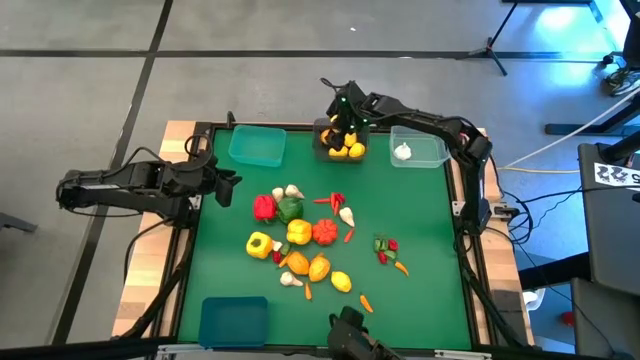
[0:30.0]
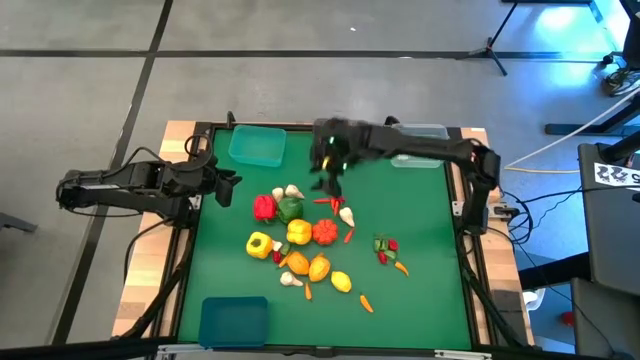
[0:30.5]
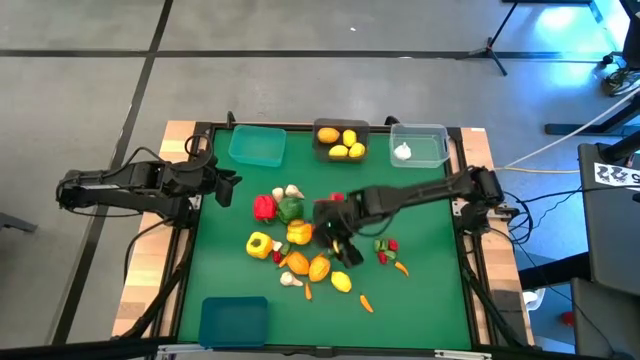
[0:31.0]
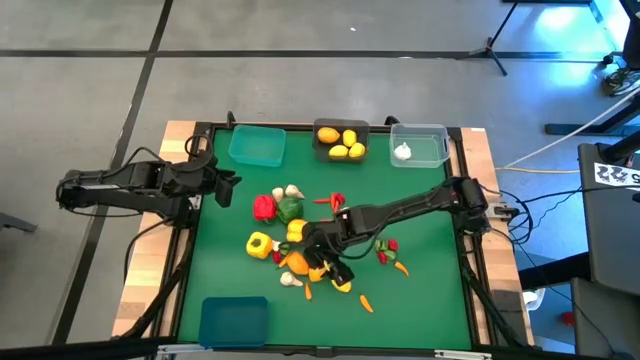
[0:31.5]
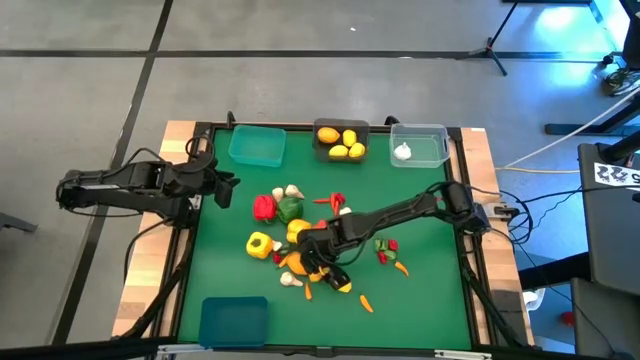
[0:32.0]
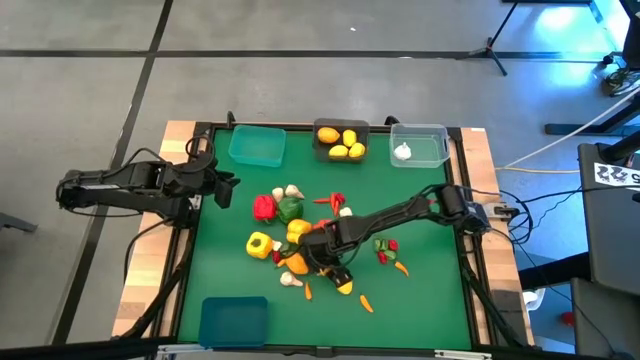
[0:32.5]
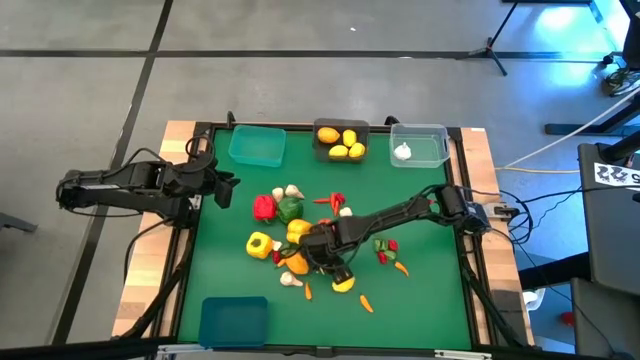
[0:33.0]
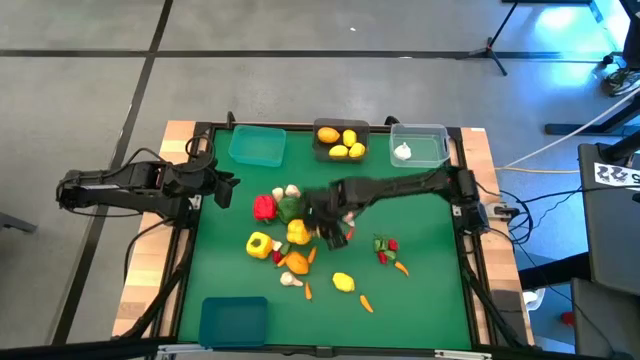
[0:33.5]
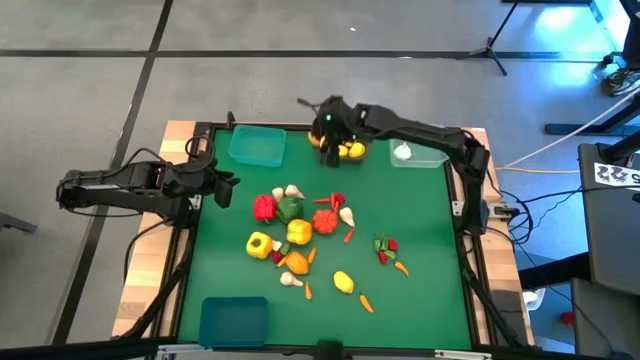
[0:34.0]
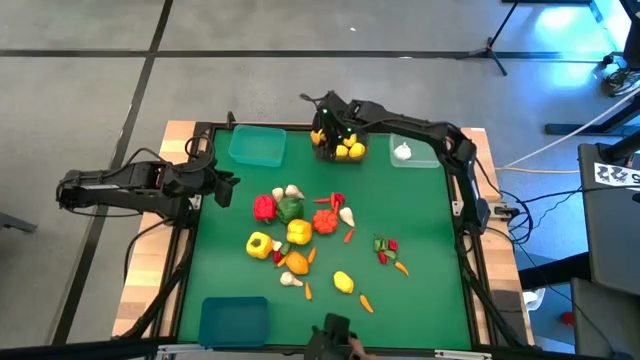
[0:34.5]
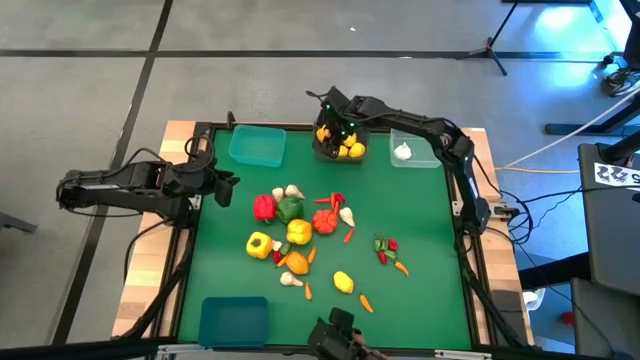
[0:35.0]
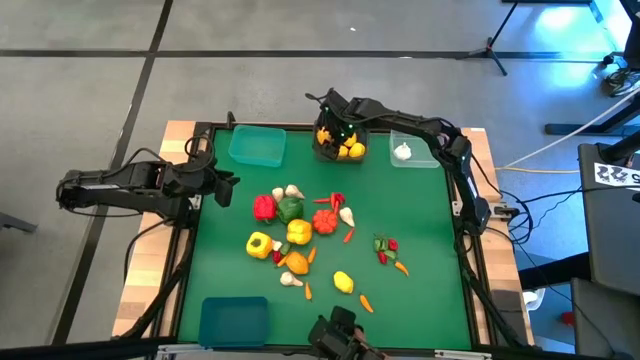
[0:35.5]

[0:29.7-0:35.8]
Task: Sort produce into baskets
Put the yellow lemon into the black bin

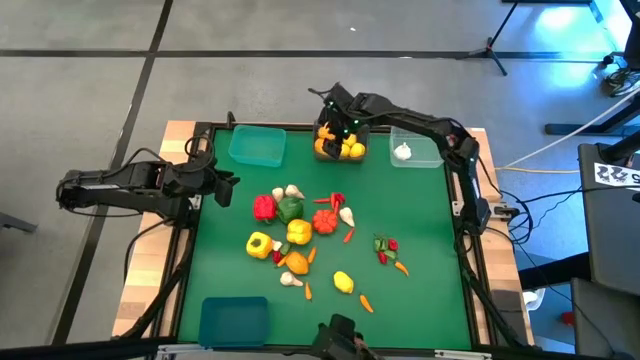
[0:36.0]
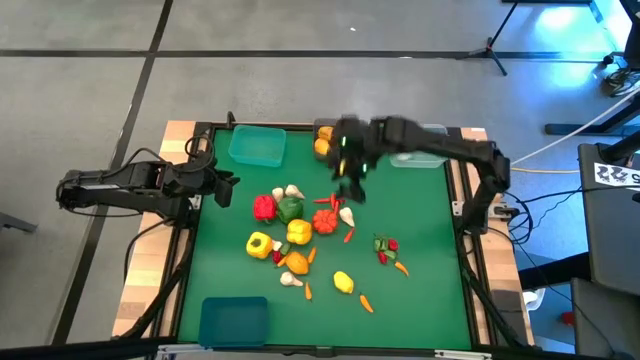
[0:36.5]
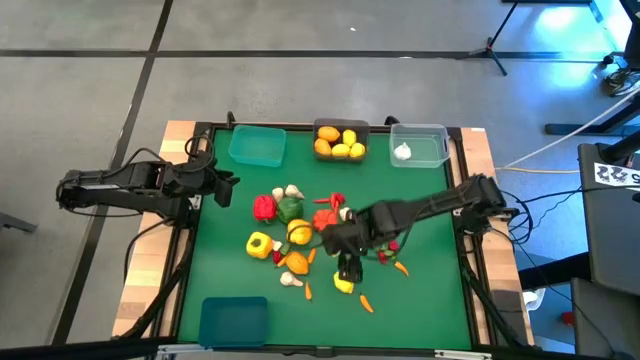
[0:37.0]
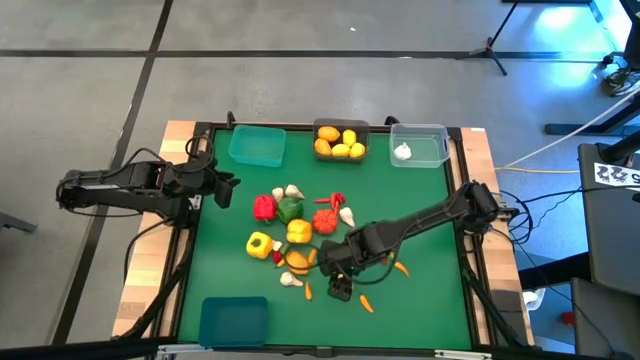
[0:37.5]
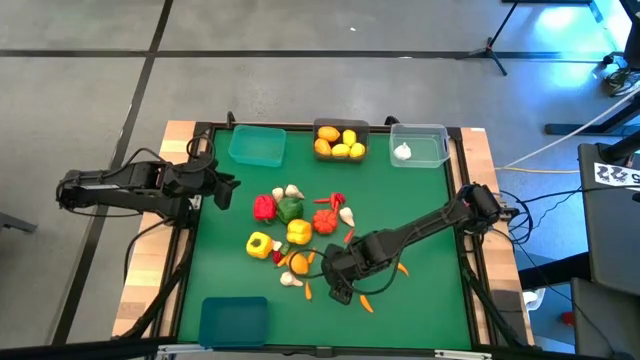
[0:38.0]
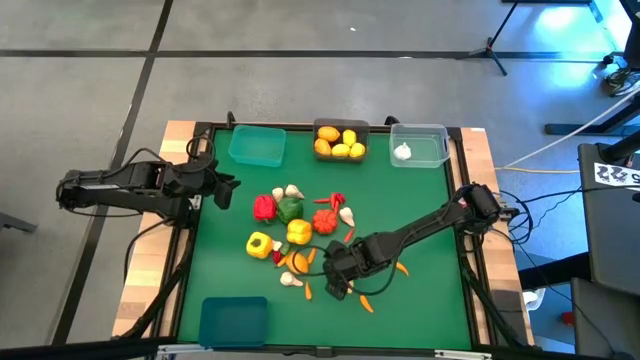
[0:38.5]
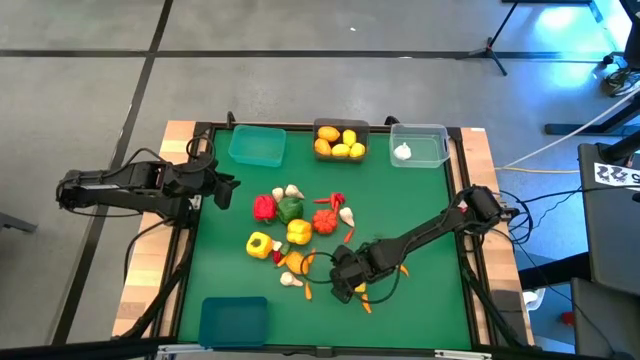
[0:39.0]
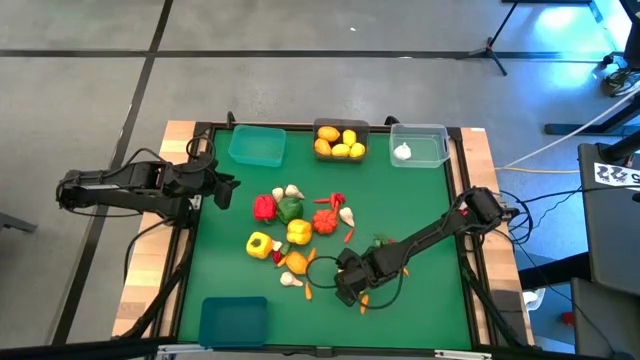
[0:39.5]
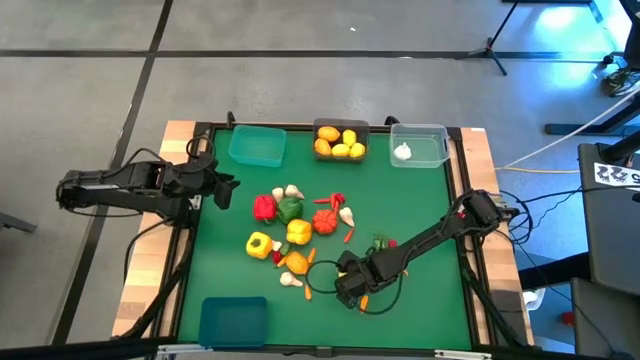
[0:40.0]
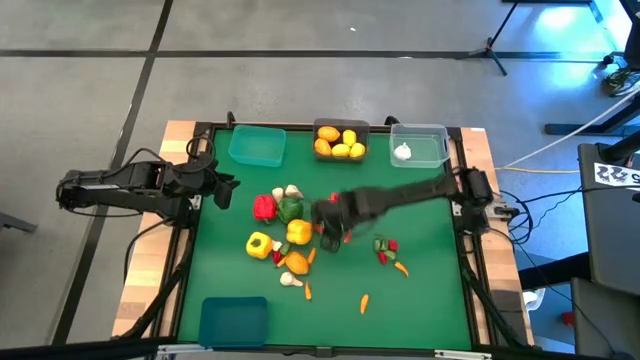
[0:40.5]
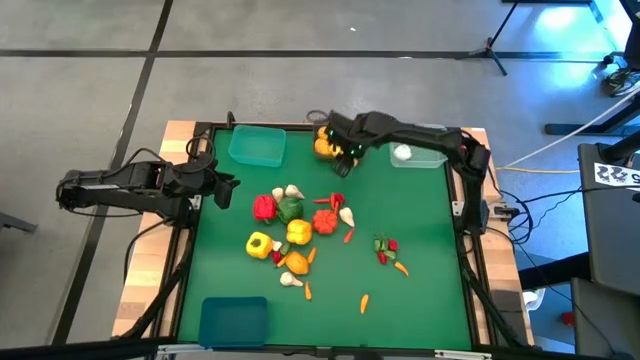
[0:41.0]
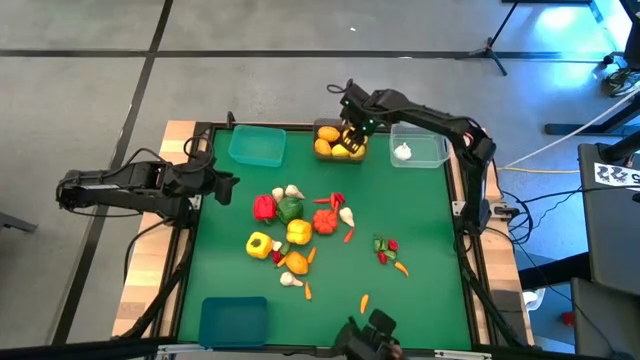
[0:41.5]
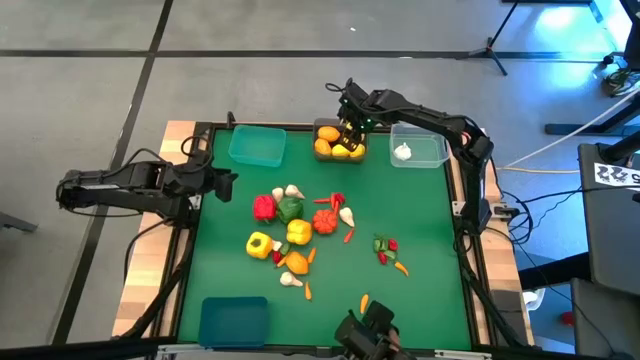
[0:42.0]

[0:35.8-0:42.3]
Put the yellow lemon into the black bin

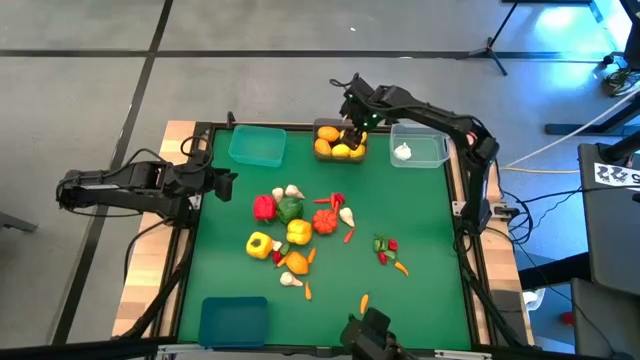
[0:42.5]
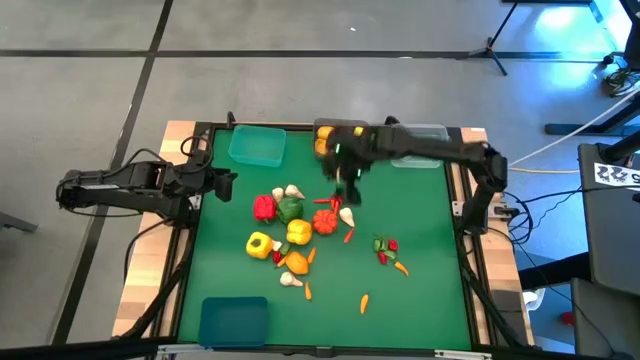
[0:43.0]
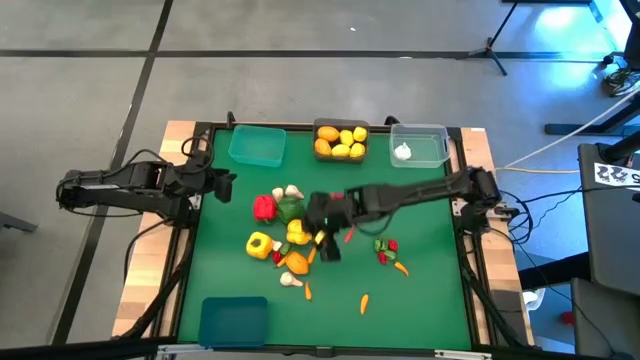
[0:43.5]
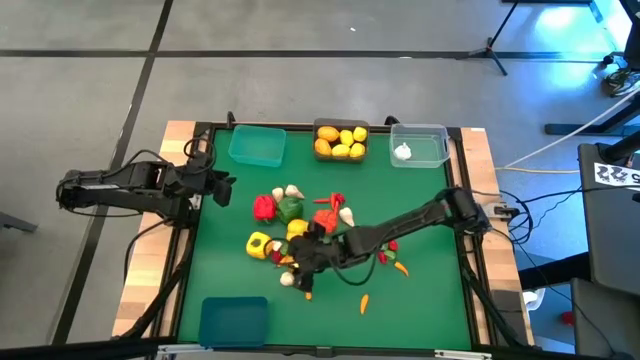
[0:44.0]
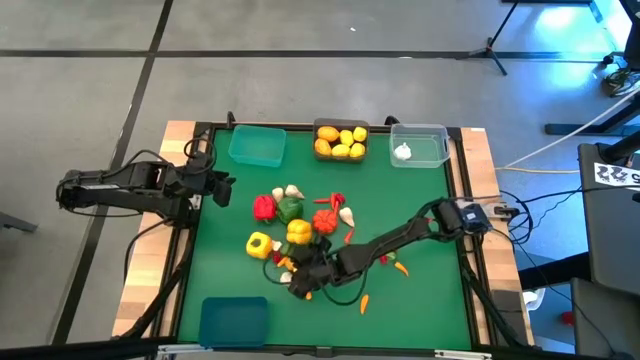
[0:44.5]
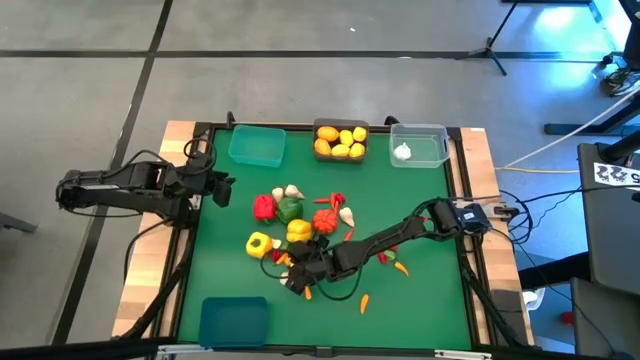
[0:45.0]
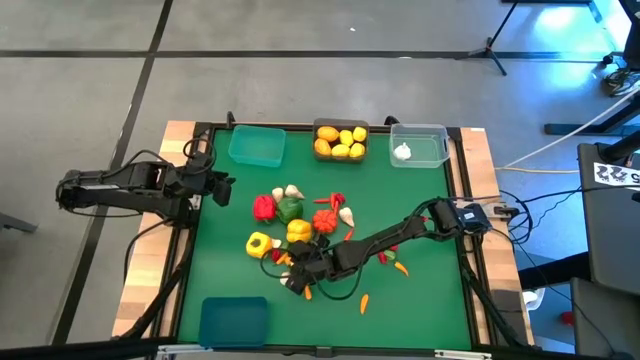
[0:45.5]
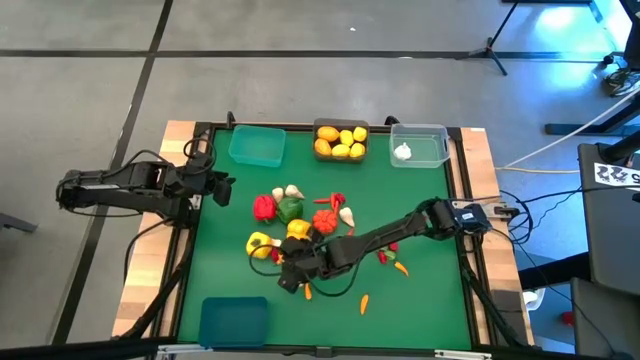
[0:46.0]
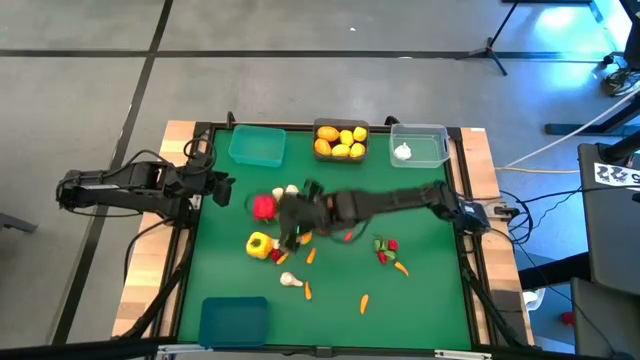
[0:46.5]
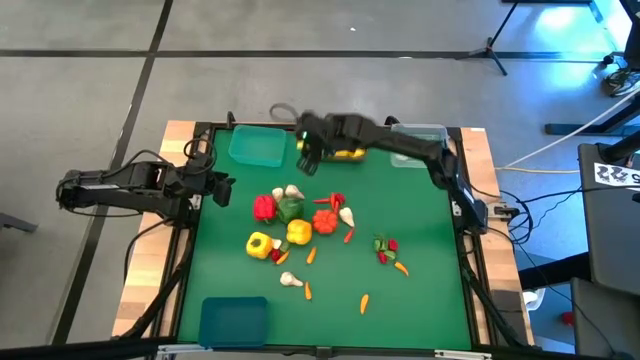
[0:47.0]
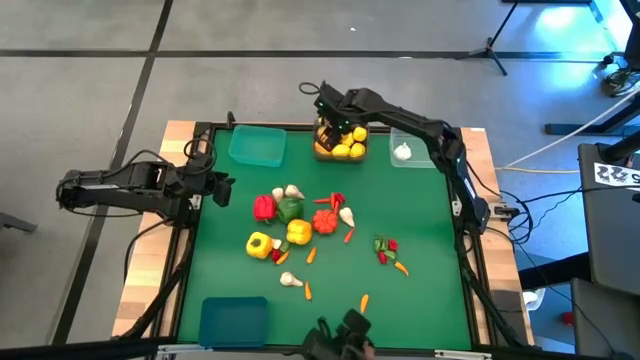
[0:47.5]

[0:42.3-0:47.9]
Put the yellow lemon into the black bin

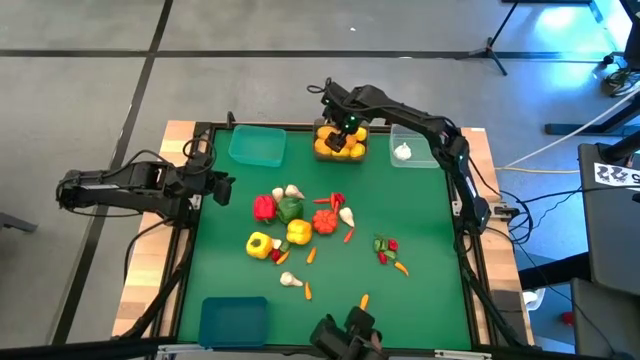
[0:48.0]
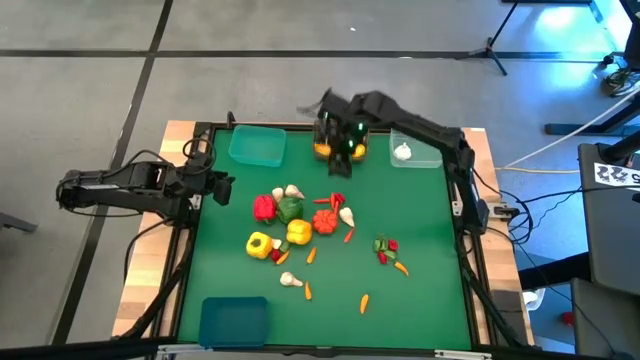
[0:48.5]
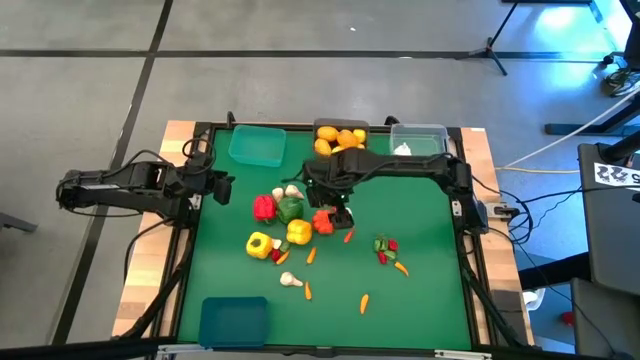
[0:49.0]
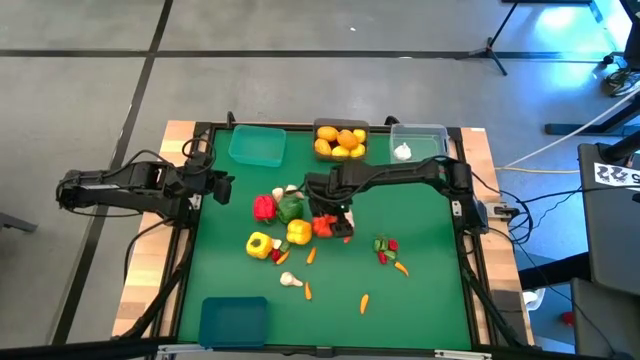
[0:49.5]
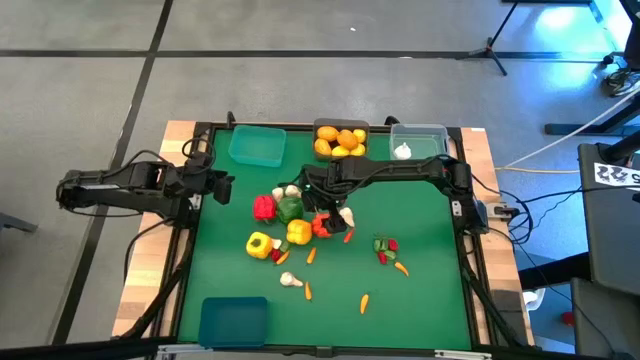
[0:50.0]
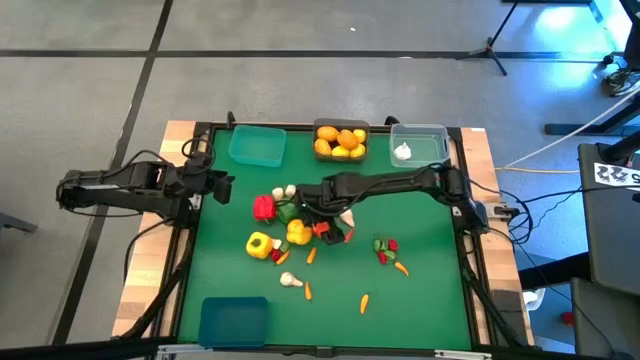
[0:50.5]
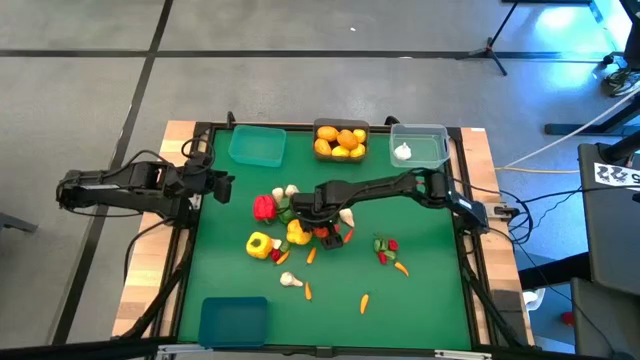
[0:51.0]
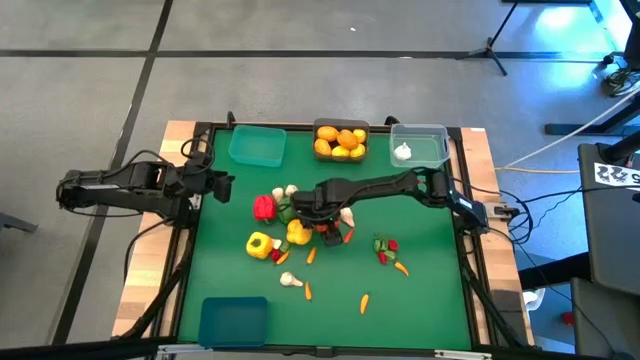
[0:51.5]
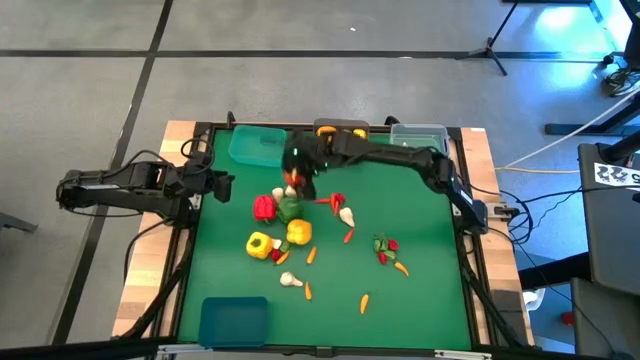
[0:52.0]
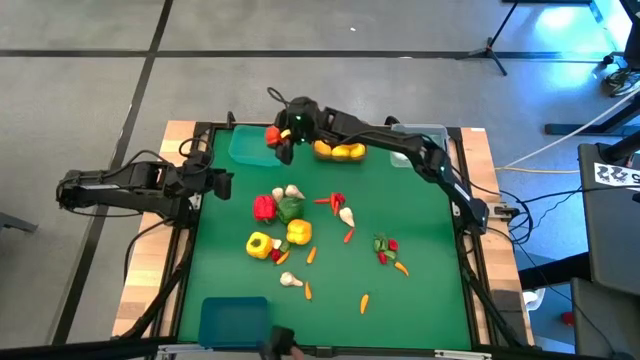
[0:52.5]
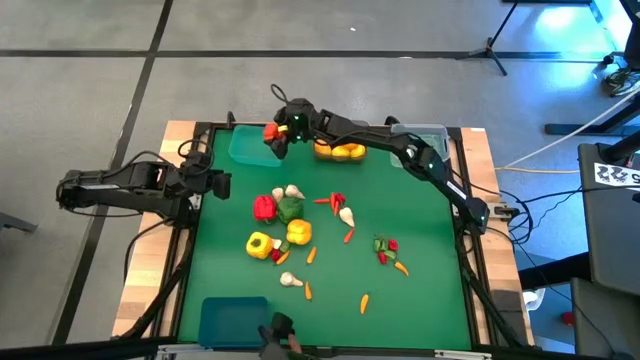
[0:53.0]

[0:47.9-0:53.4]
Put the pumpkin into the light blue bin
